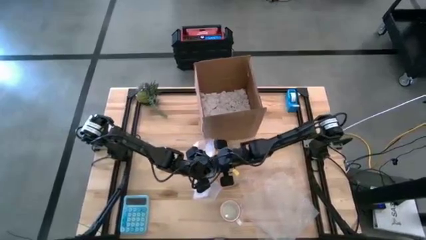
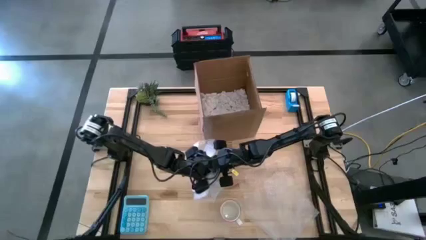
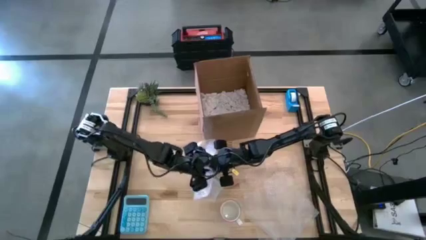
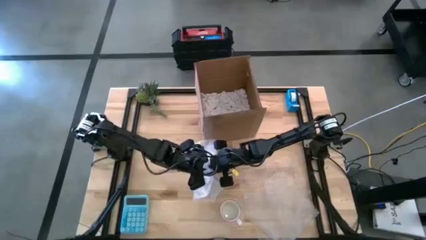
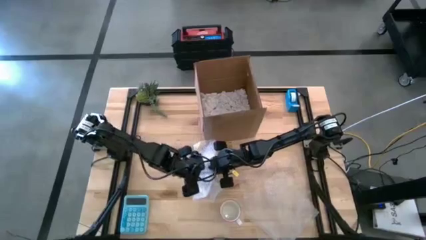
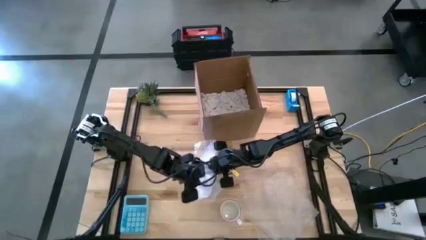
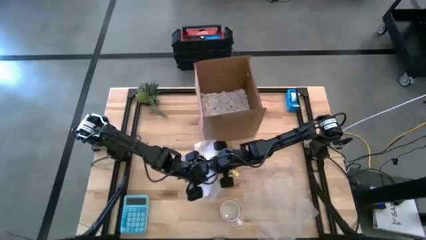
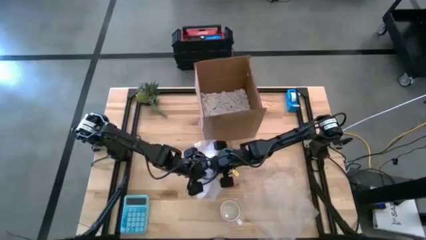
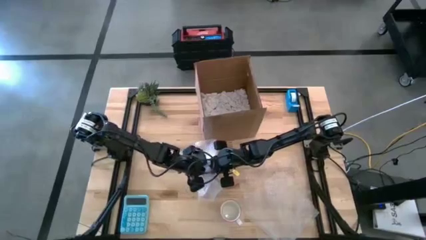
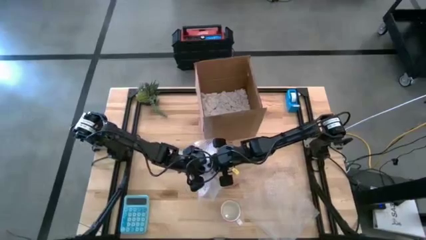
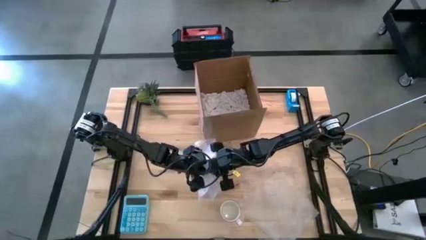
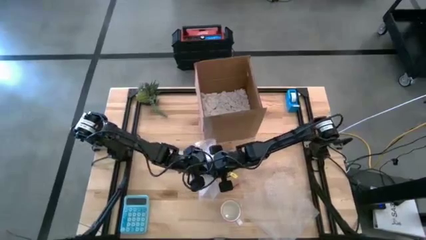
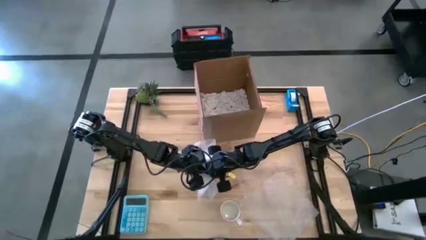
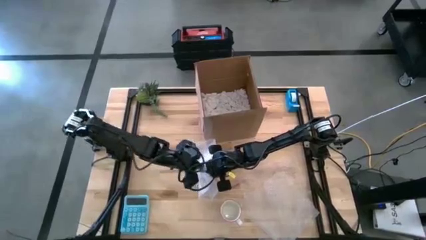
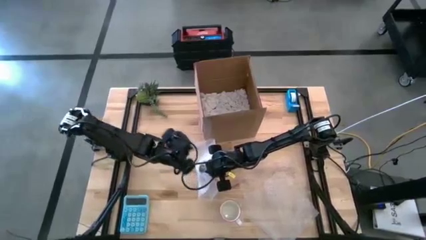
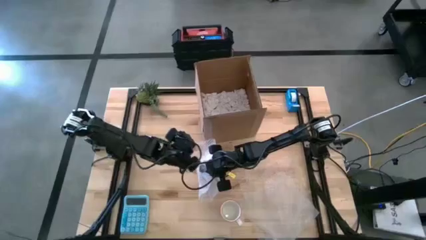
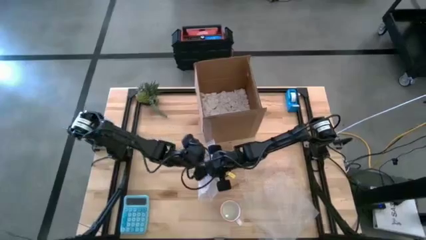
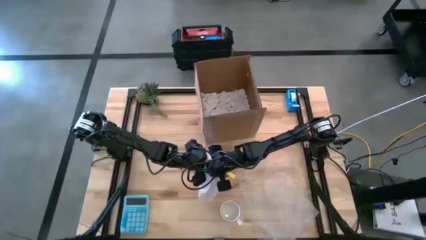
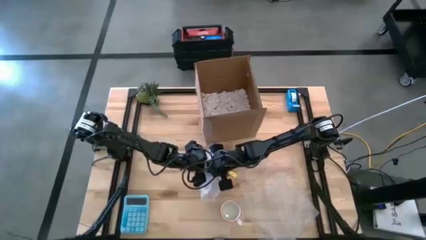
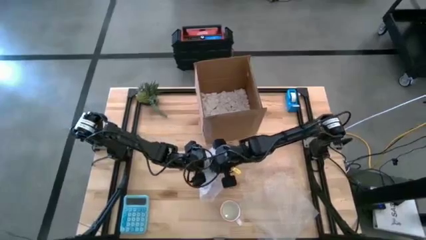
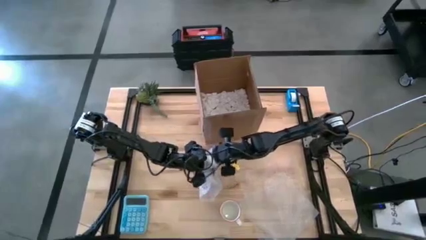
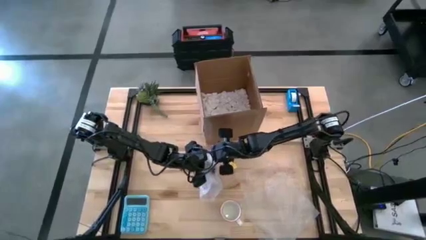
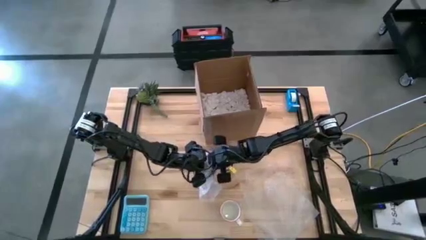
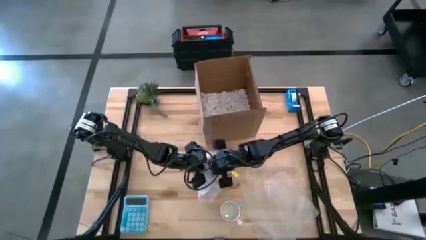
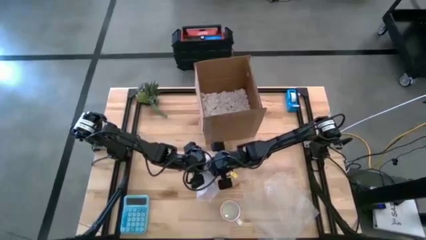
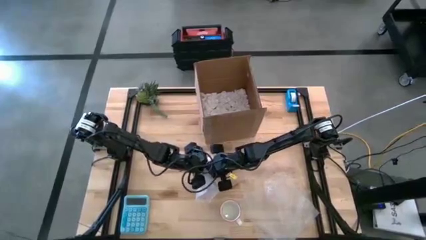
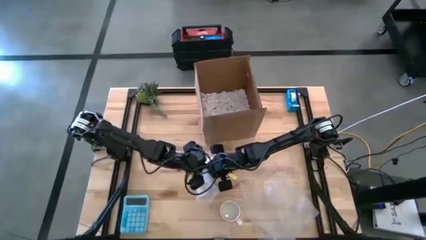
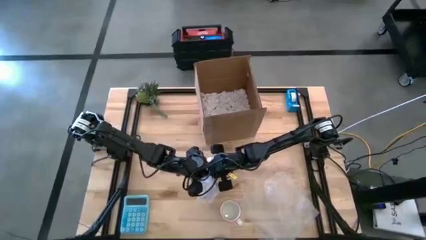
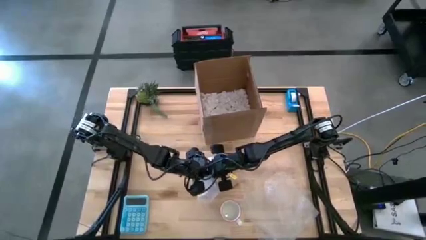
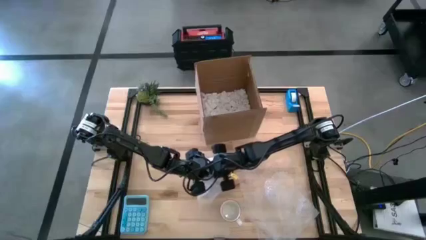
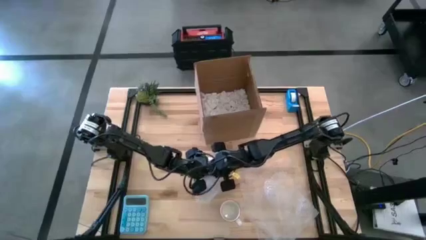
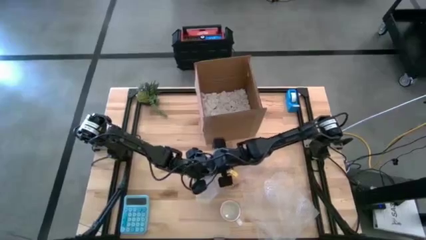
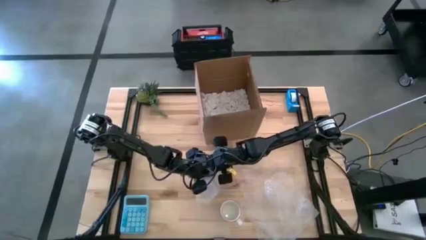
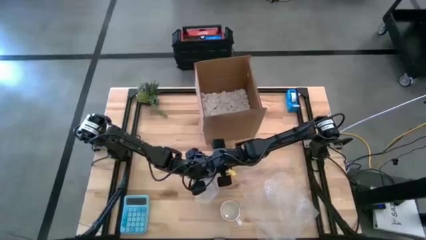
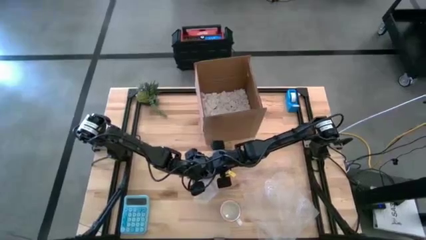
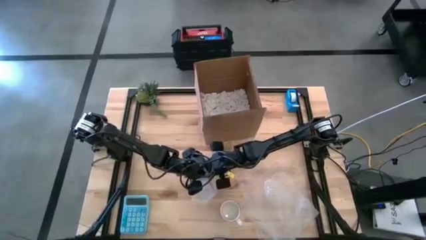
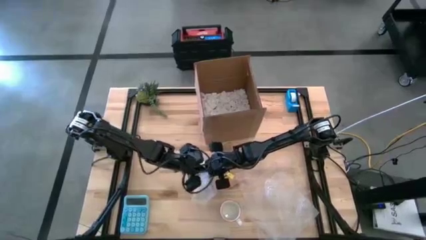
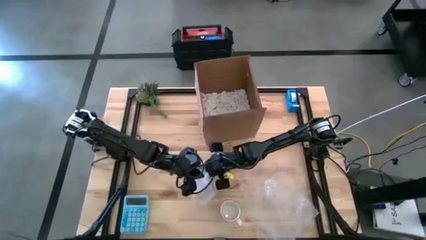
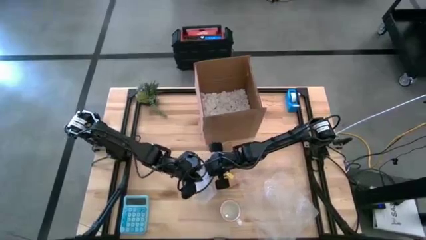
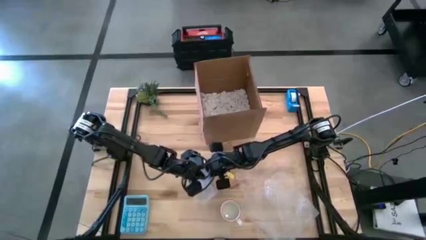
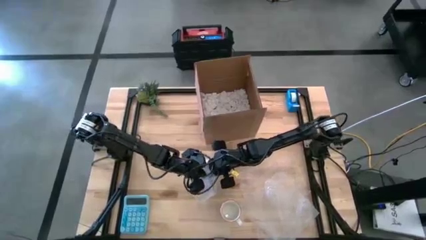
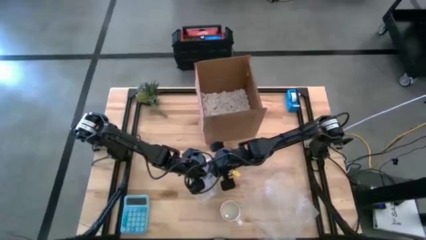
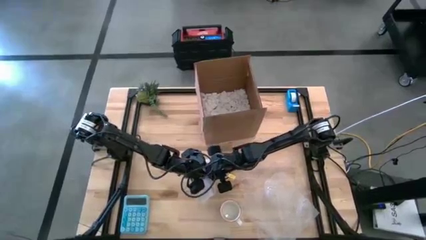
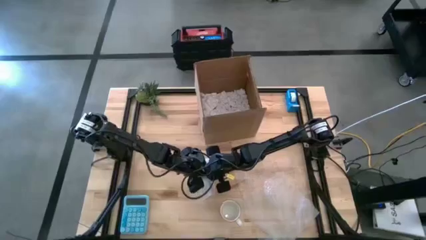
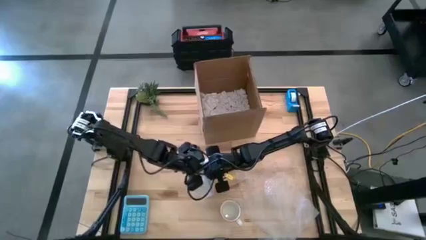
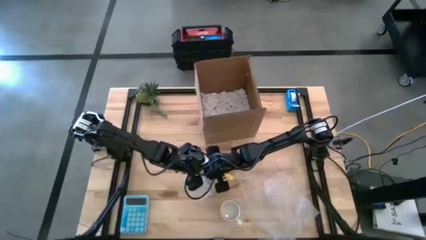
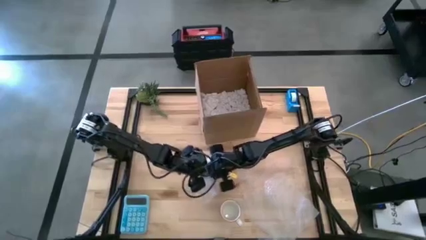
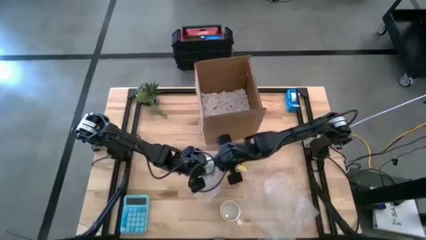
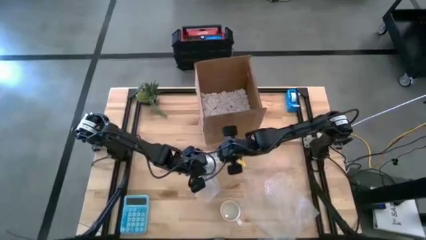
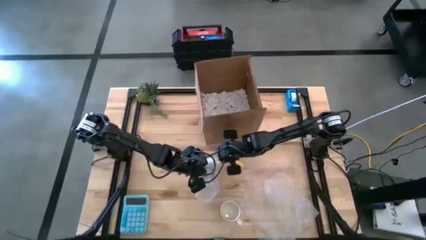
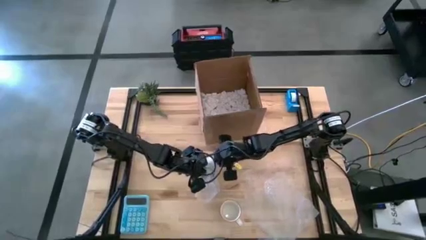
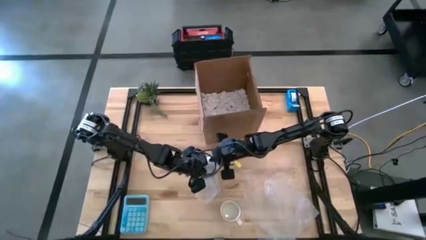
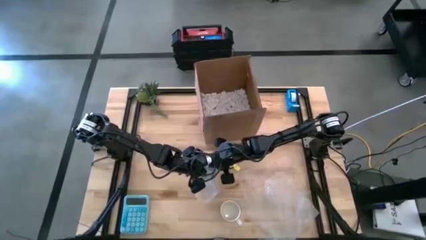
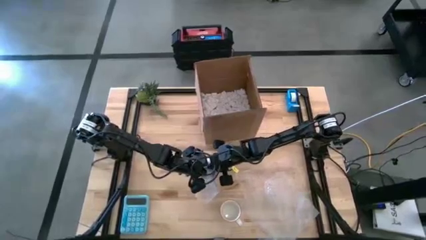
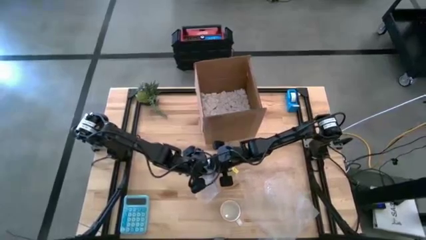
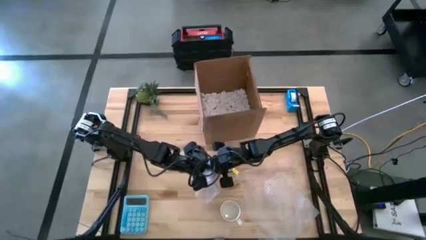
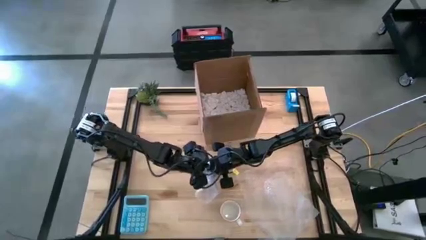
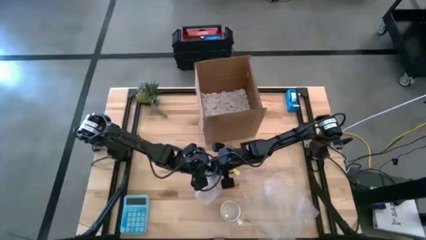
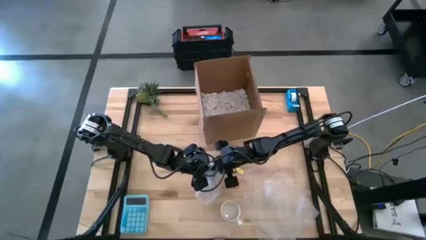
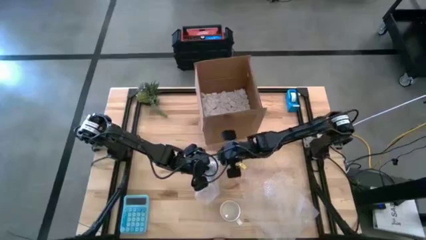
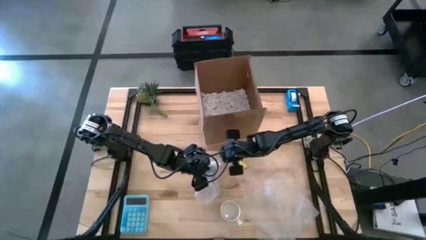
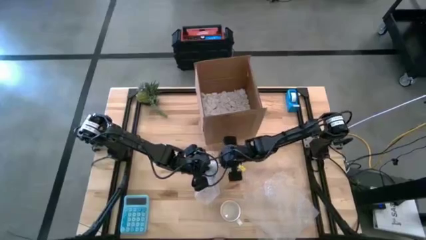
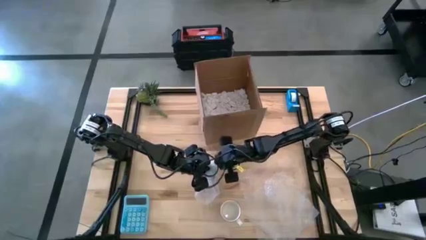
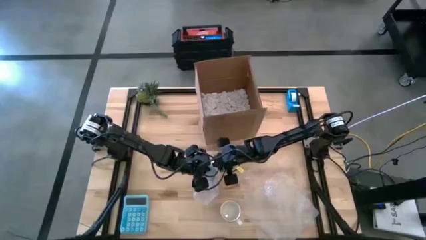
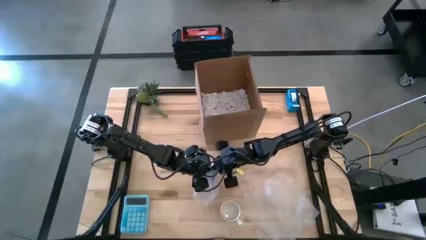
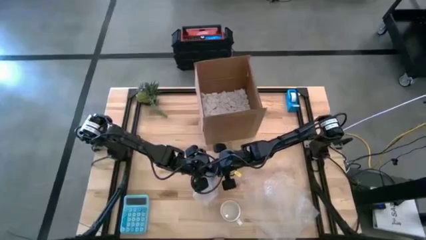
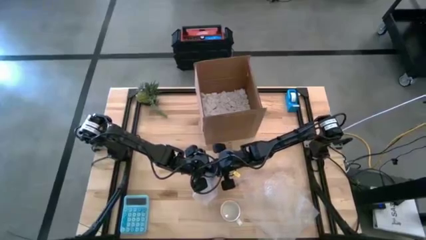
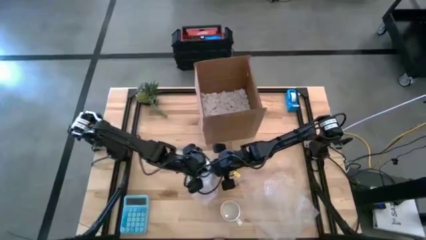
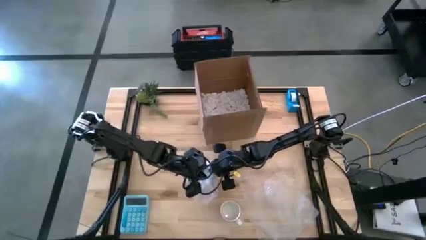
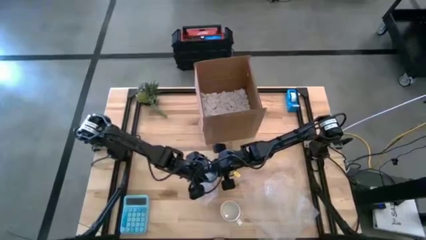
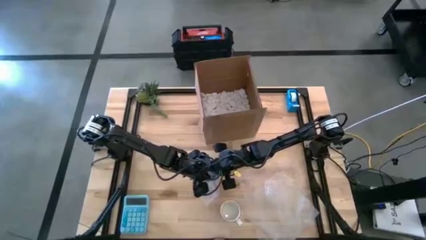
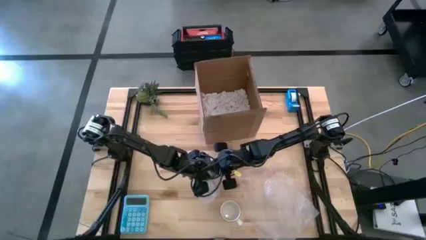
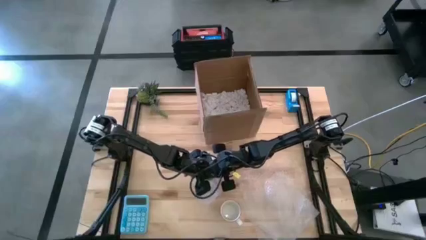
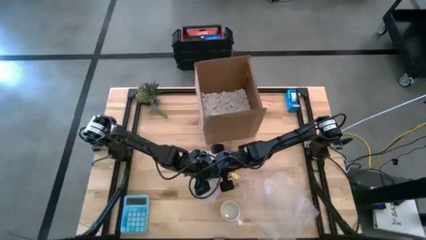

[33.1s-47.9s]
Task: wrap mug
Wrap the purple mug with the left bubble wrap
